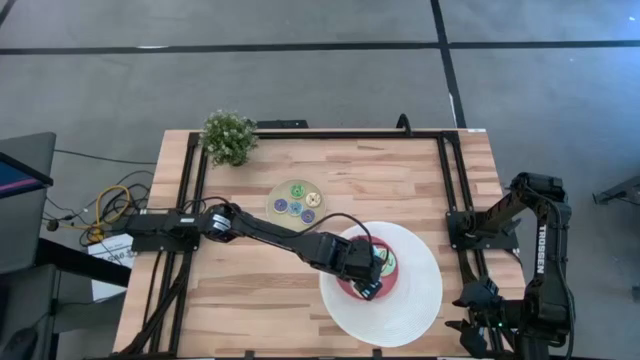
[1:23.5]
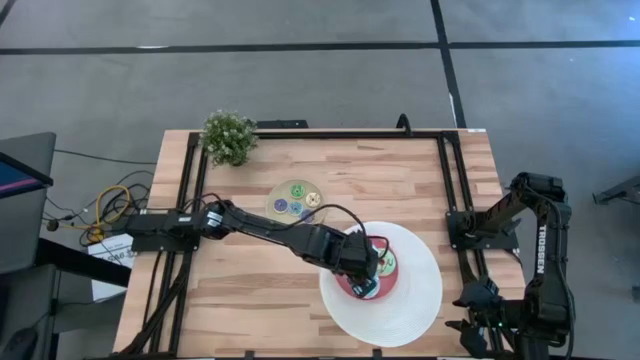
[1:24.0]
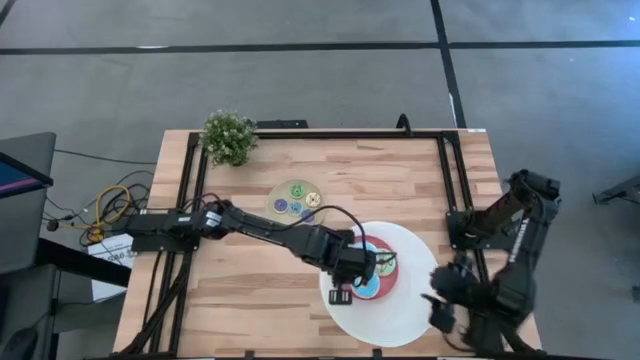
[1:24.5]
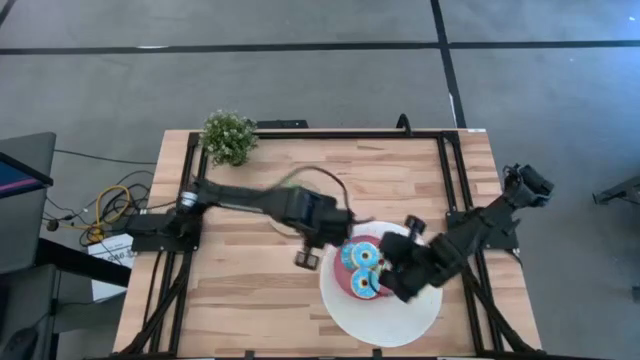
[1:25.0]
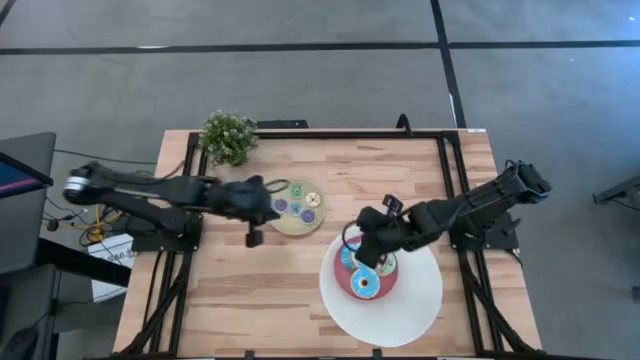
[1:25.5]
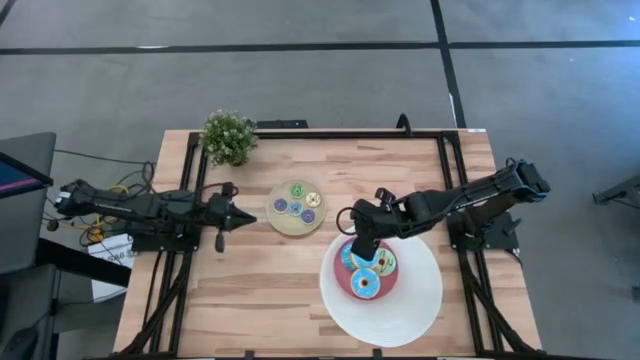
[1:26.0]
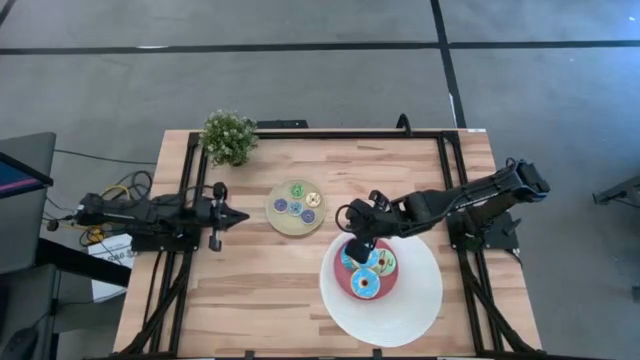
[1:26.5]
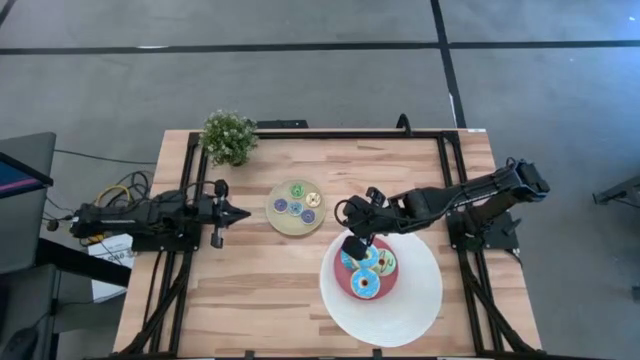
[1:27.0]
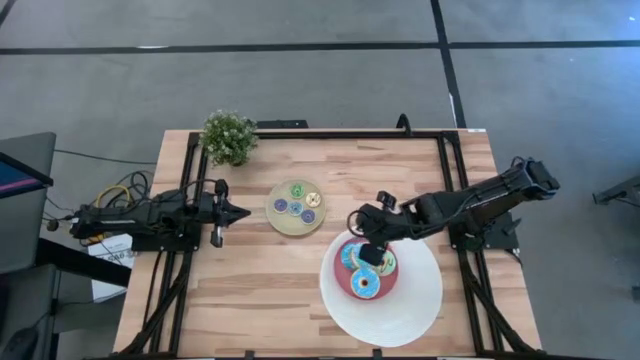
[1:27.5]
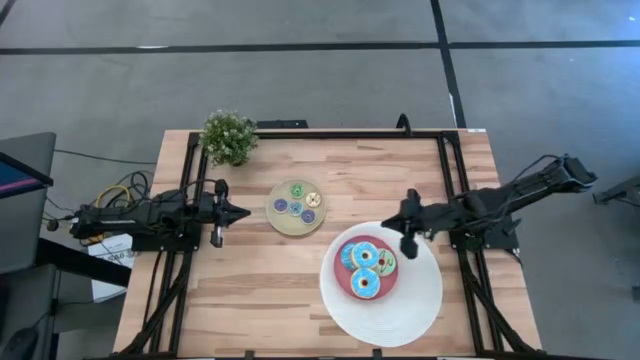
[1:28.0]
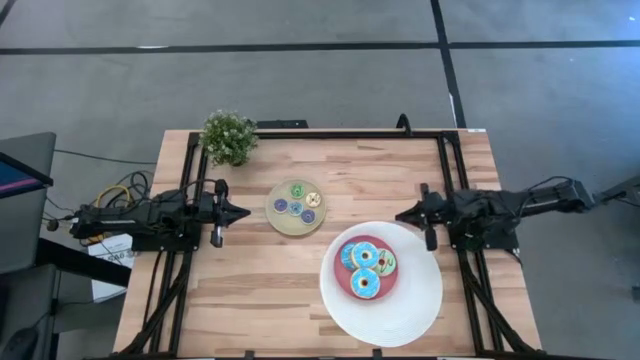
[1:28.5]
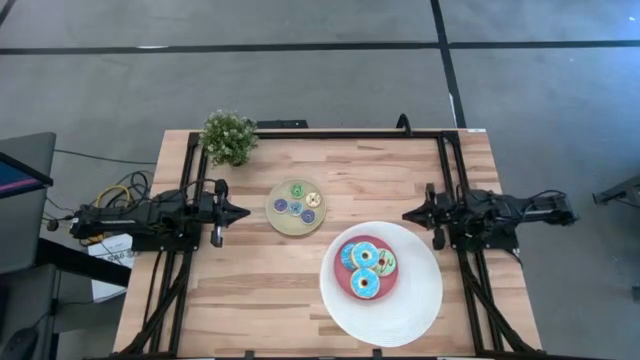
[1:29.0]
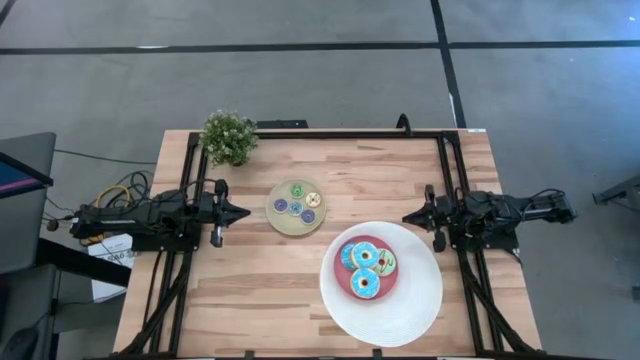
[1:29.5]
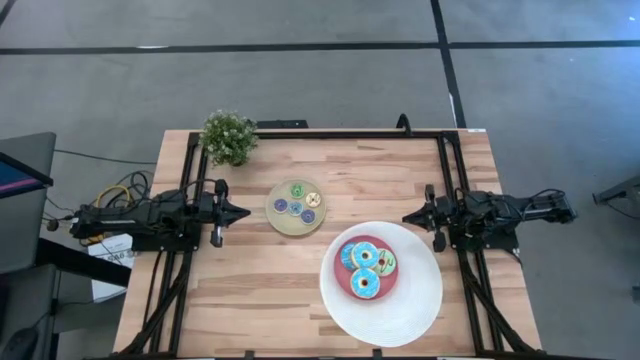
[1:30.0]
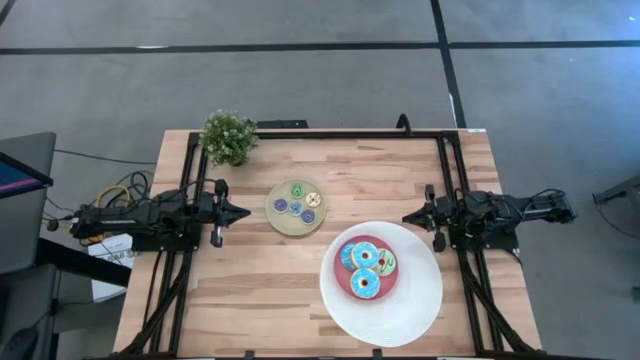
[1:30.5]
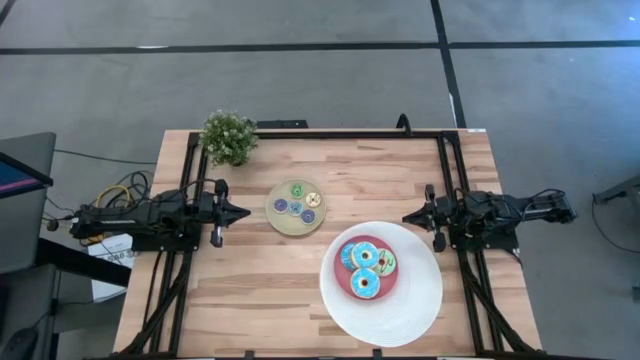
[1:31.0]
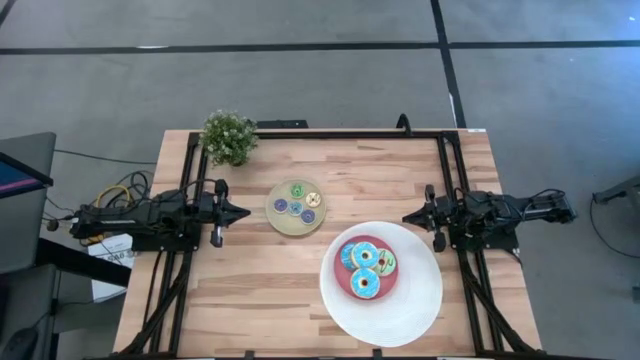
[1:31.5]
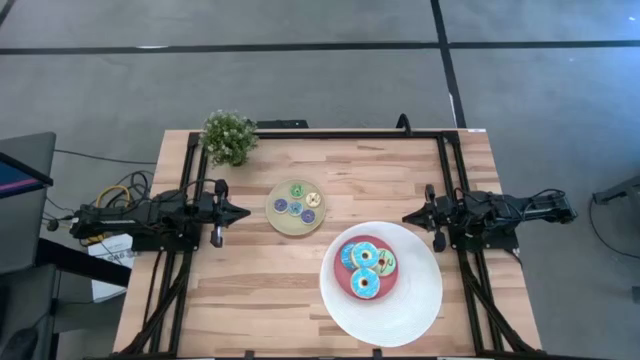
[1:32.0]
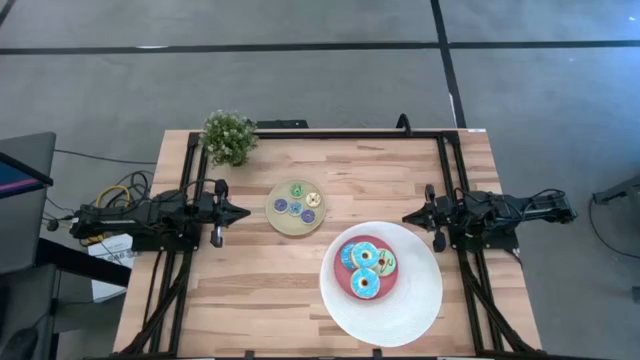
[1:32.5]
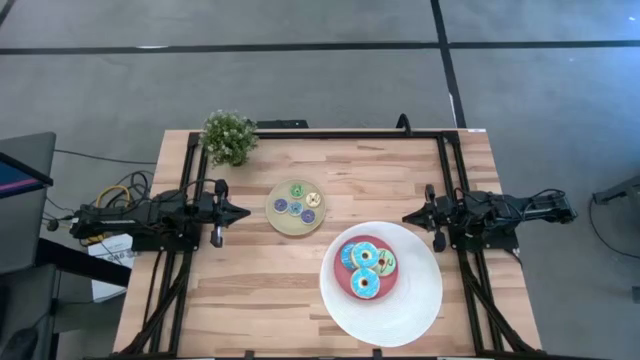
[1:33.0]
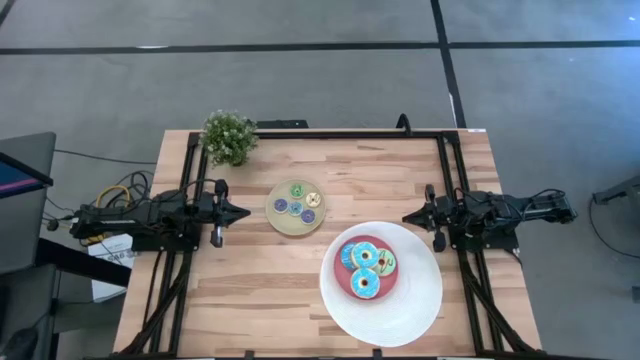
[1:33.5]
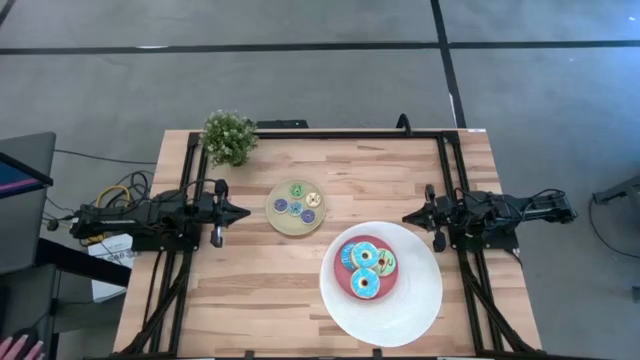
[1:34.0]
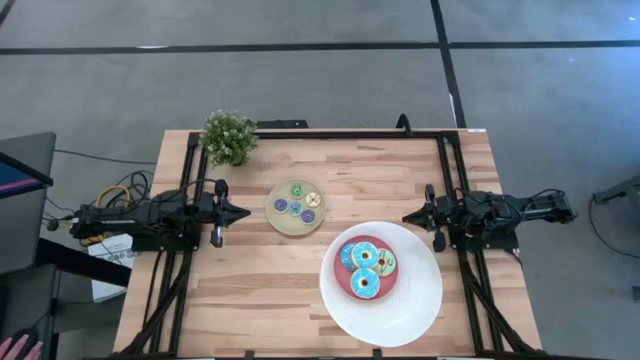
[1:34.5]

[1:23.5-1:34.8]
Task: Pick & Place donuts
Return to Home Position

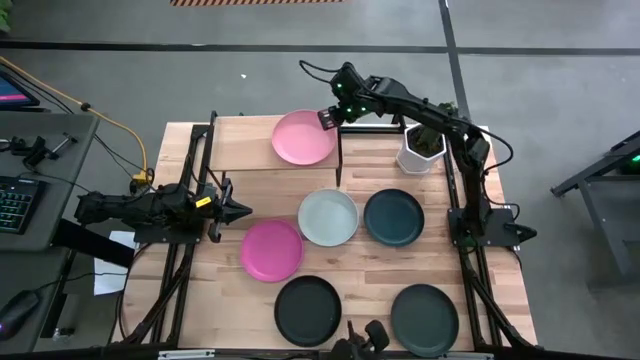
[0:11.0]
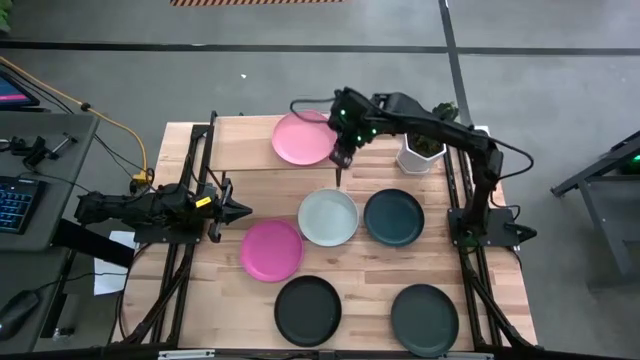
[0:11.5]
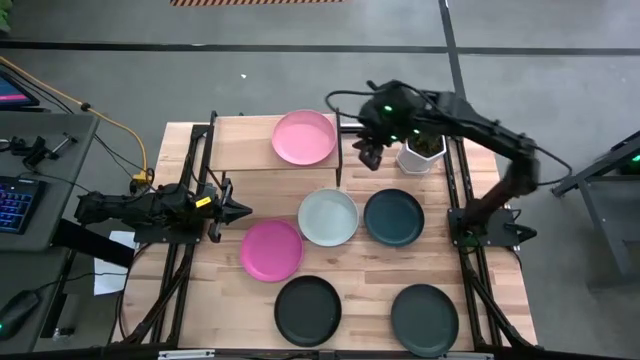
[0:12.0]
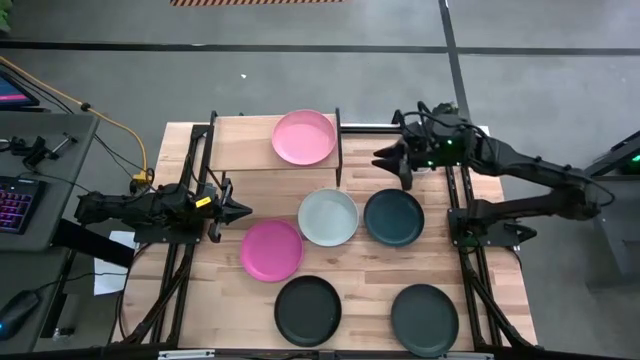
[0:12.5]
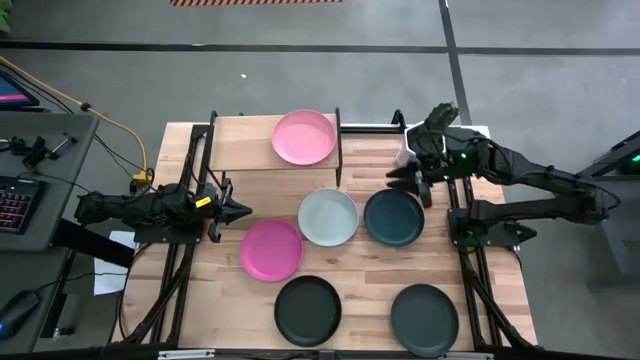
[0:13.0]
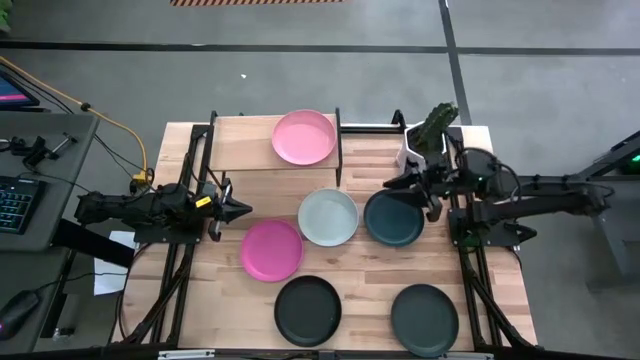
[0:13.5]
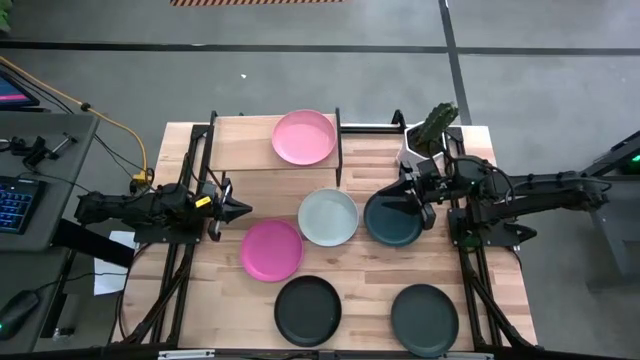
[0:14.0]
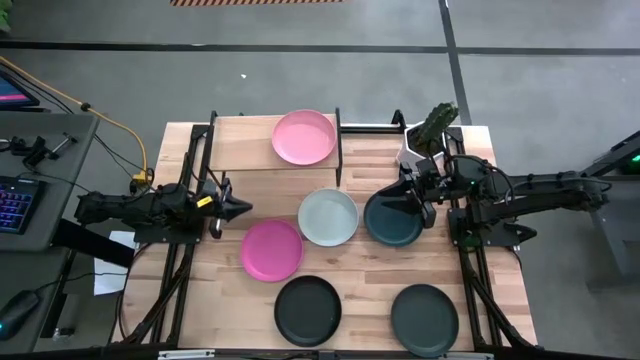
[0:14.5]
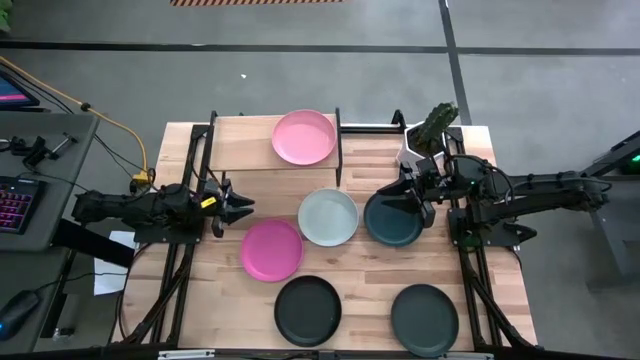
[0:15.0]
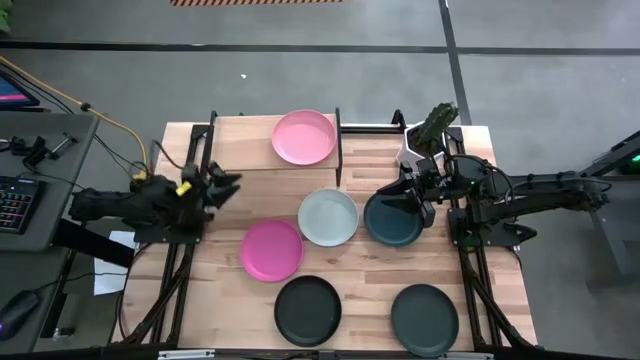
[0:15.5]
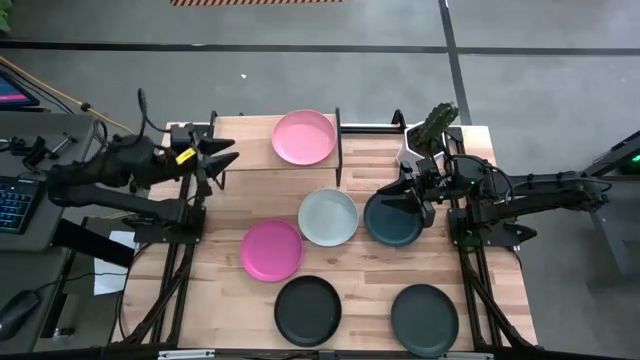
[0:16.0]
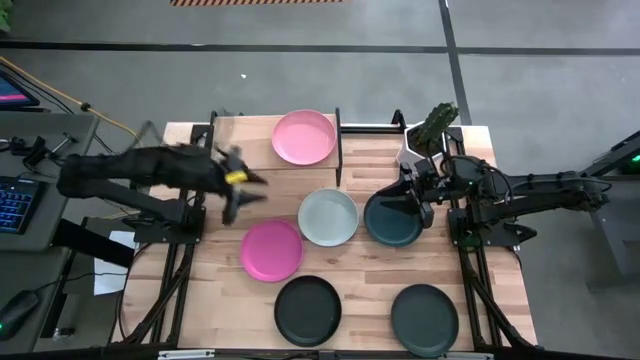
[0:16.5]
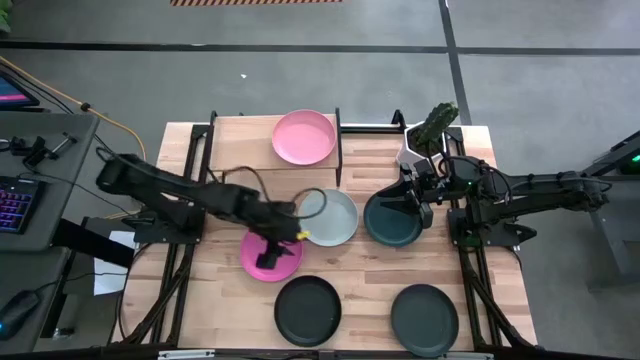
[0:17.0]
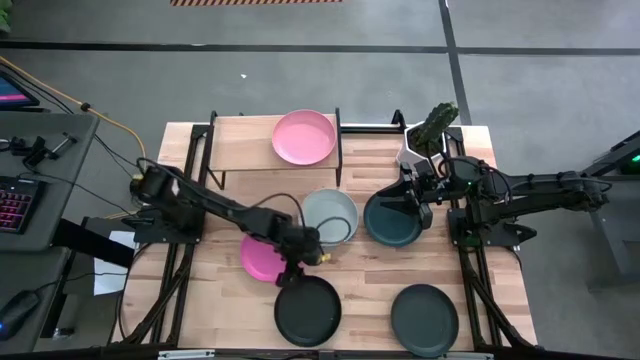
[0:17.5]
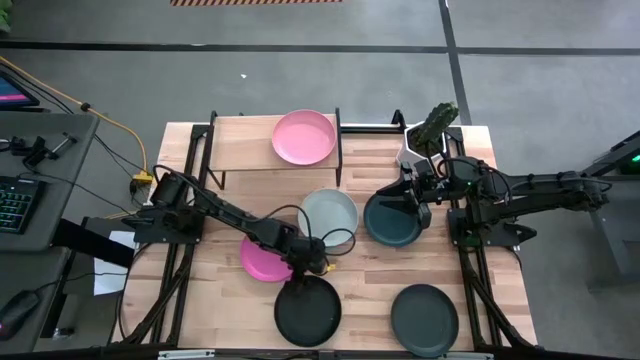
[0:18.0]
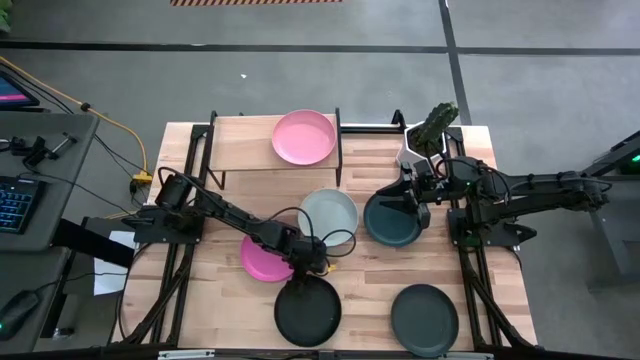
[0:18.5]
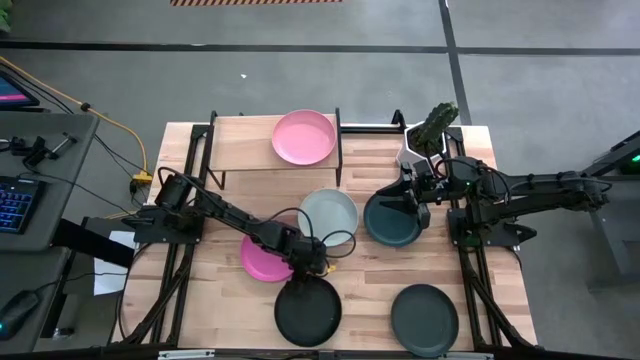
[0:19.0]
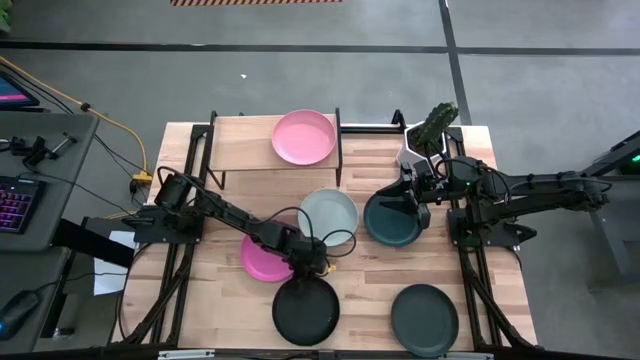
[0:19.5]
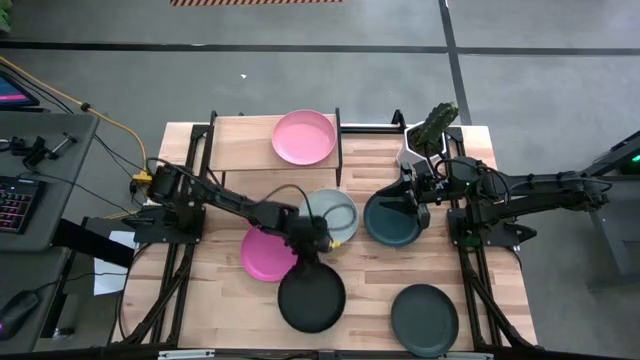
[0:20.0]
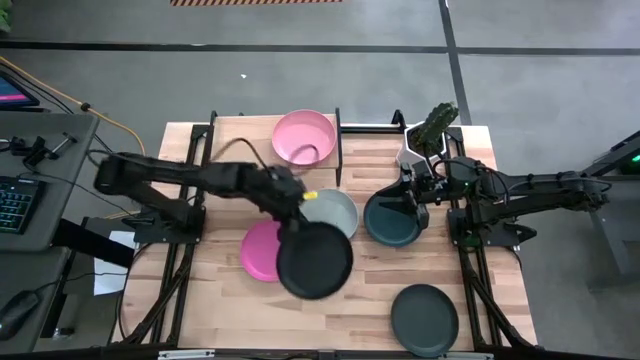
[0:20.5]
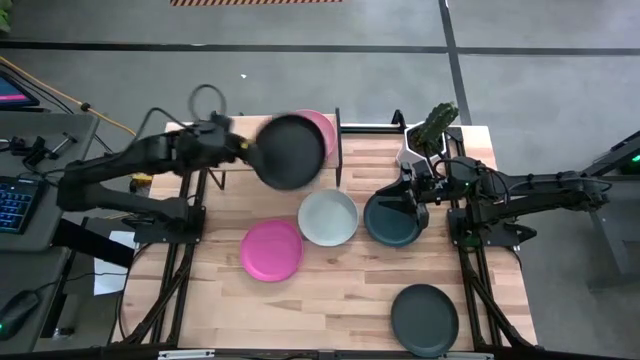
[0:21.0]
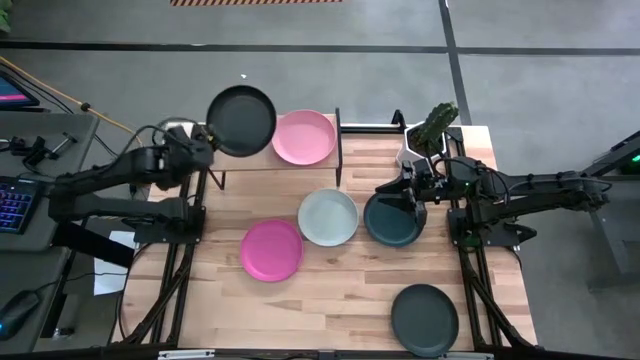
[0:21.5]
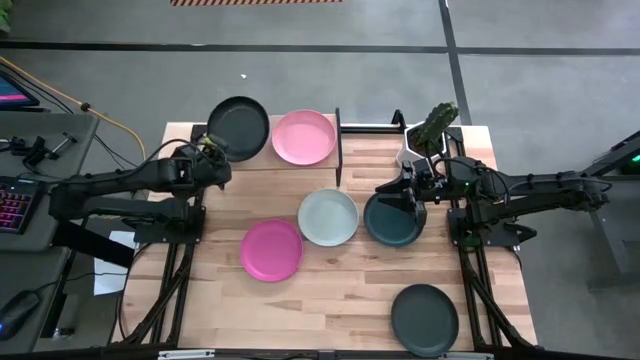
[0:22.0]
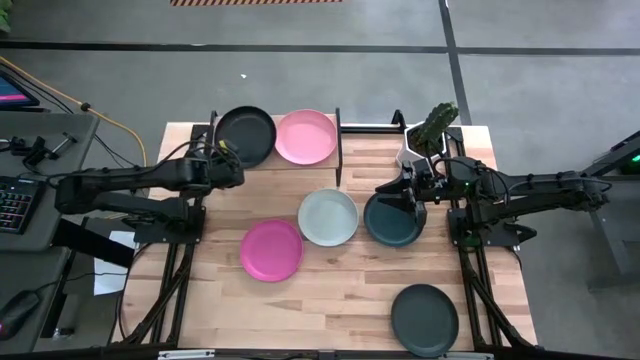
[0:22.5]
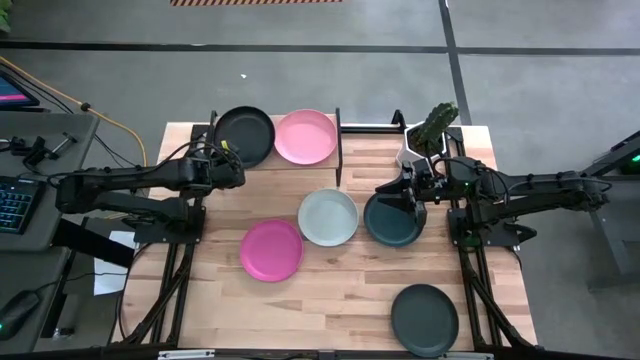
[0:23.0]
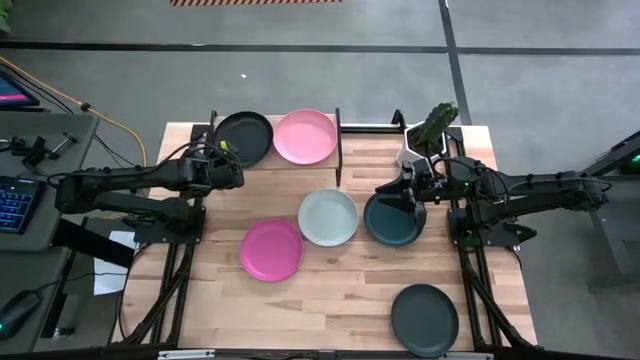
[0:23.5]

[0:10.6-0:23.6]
Task: Place and stack plates onto a shelf
Put the black plate on the shelf
